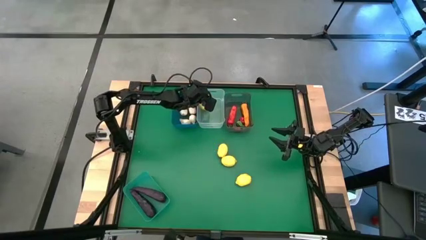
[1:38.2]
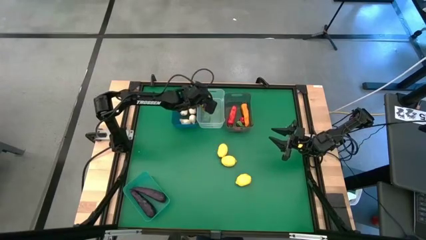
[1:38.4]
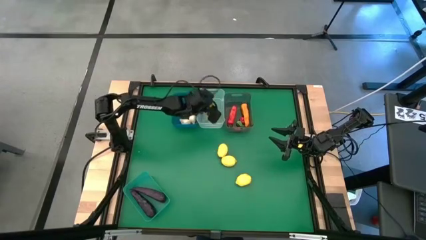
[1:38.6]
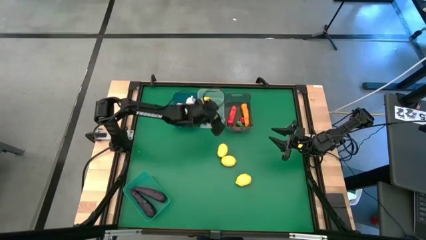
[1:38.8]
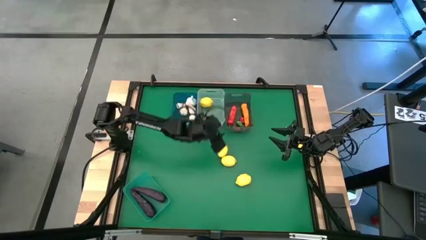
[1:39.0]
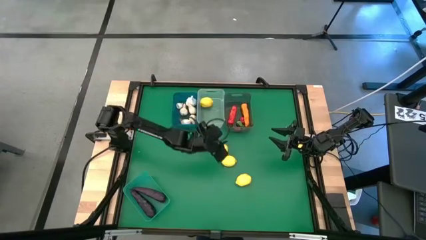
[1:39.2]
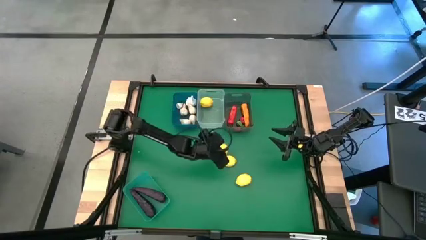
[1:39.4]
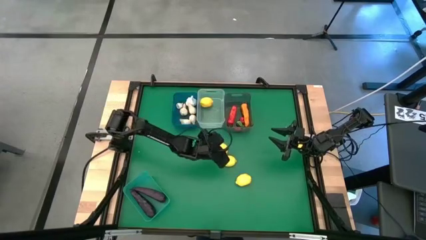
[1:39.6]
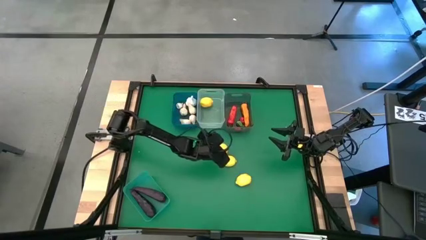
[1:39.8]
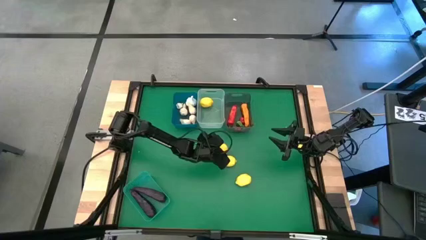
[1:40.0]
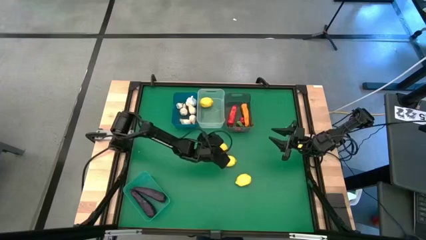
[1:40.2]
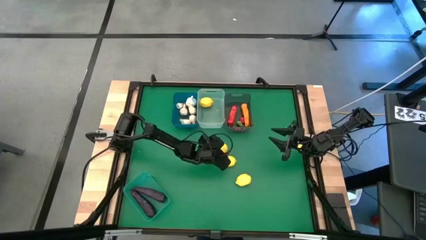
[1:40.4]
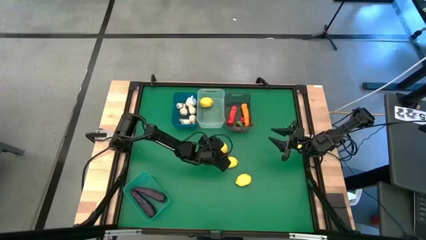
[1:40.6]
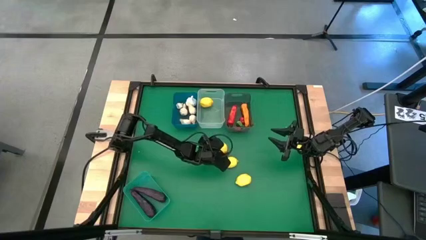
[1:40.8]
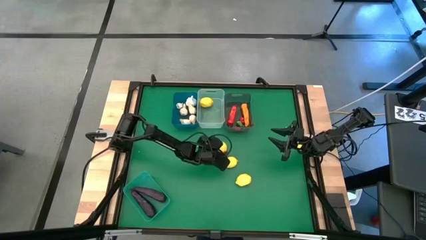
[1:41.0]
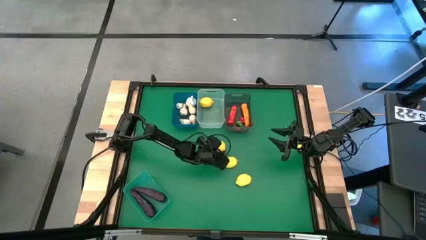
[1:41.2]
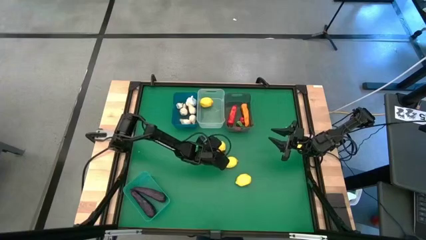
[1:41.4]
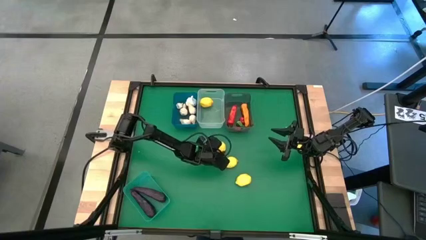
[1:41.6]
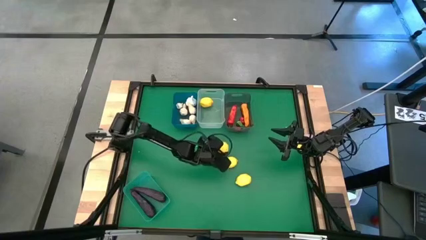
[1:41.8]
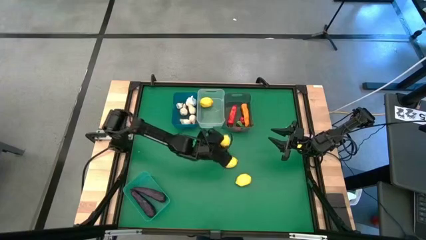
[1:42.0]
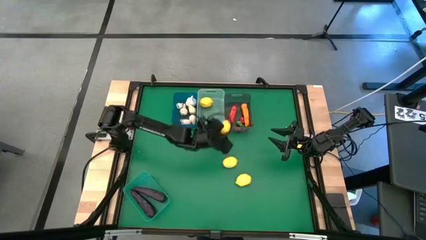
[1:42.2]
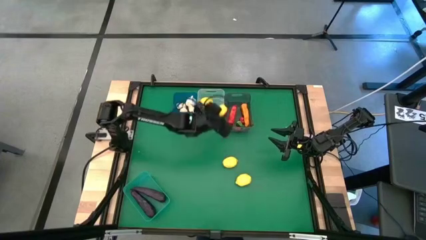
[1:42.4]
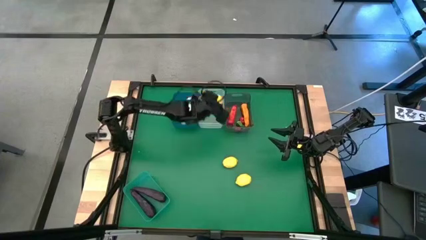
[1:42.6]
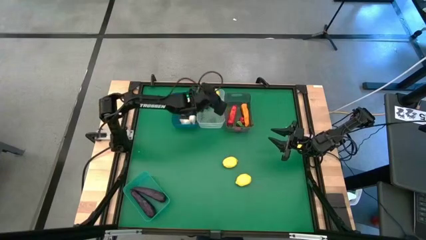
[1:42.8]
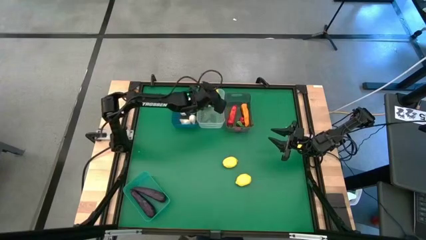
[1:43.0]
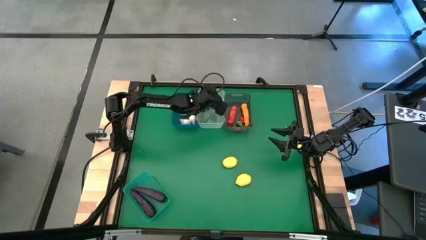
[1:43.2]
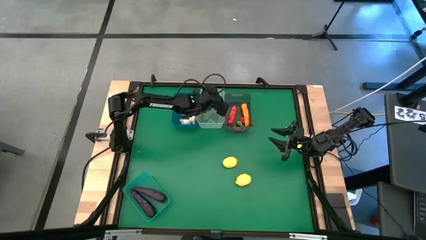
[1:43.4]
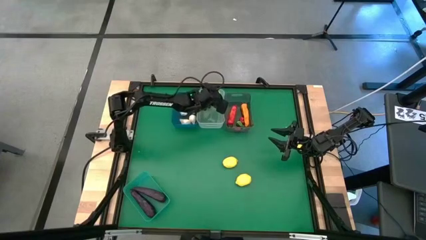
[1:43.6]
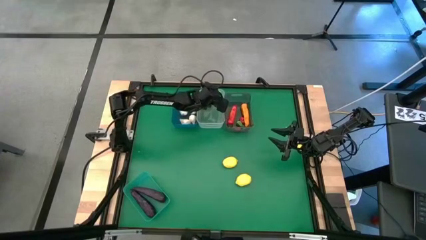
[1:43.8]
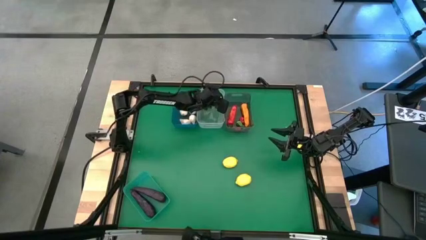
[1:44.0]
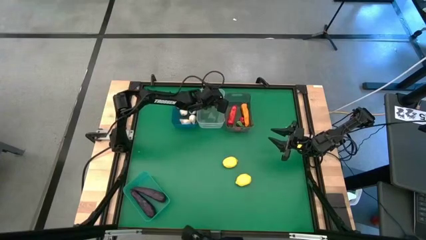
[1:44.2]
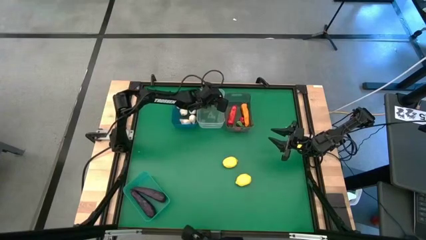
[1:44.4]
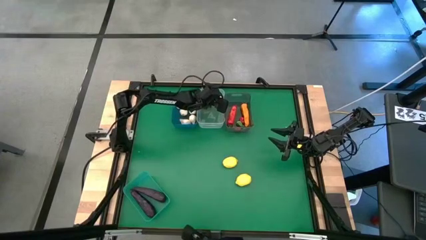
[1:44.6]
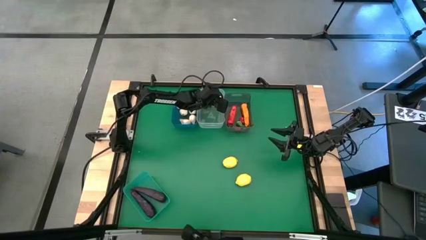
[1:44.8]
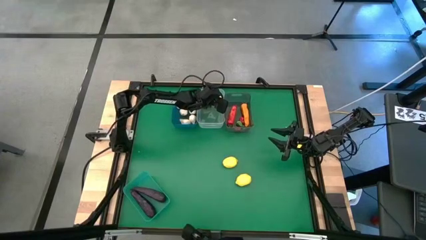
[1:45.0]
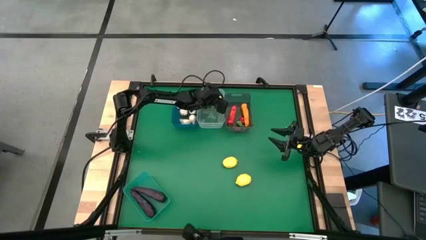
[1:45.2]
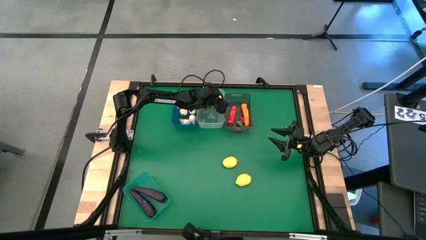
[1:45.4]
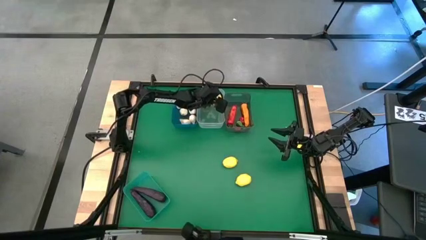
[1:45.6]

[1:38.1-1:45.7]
Task: Sort produce into baskets
Put the yellow lemon into the white bin

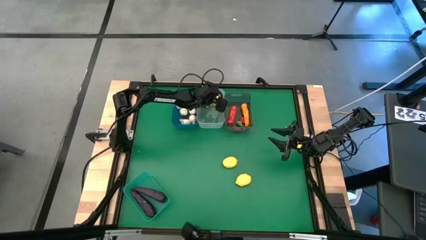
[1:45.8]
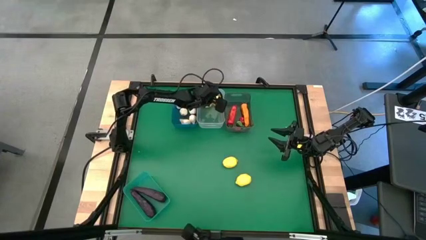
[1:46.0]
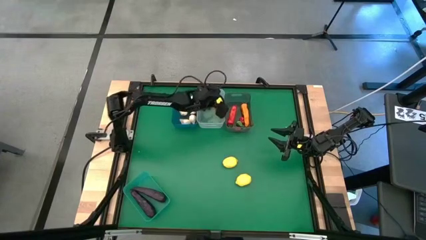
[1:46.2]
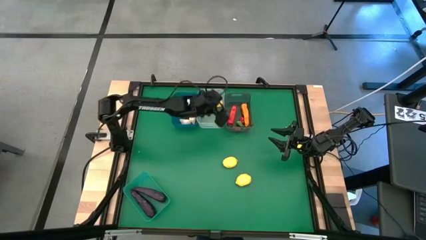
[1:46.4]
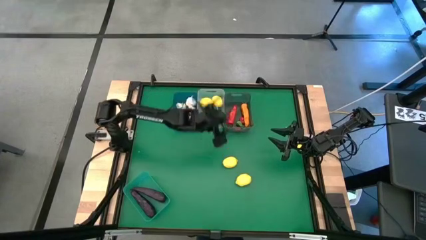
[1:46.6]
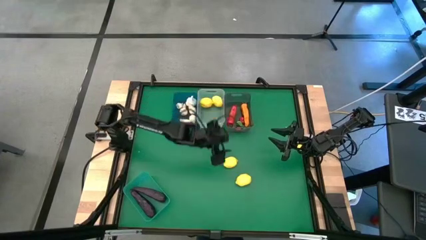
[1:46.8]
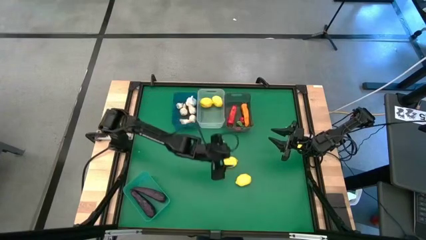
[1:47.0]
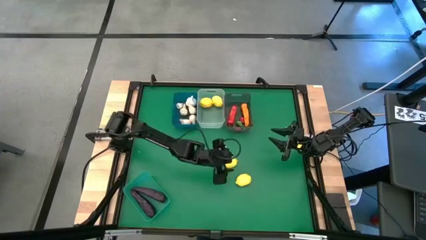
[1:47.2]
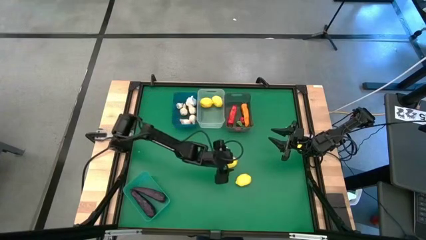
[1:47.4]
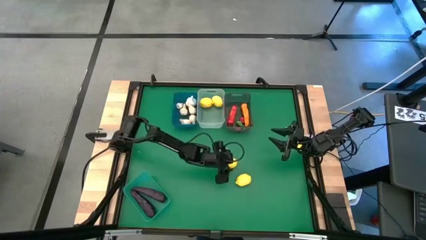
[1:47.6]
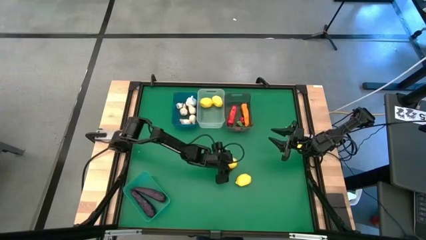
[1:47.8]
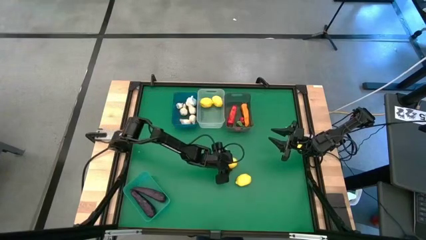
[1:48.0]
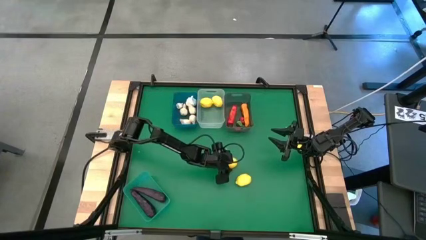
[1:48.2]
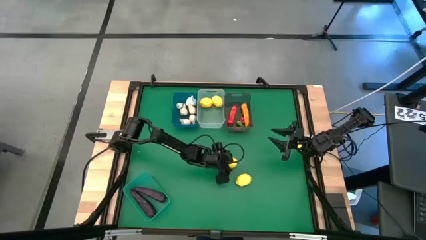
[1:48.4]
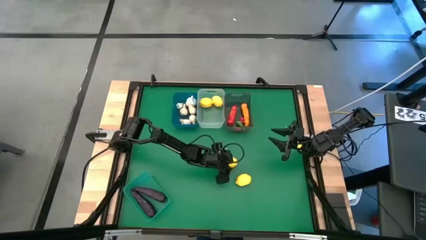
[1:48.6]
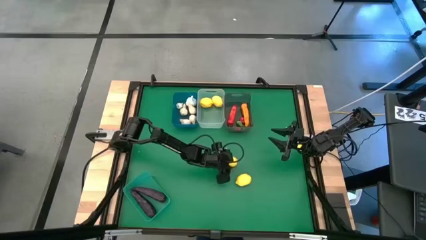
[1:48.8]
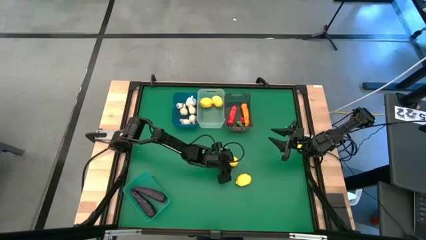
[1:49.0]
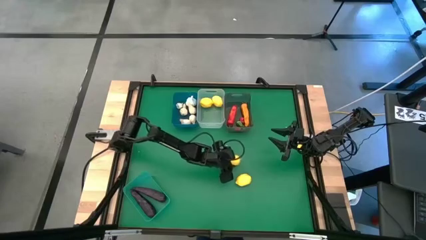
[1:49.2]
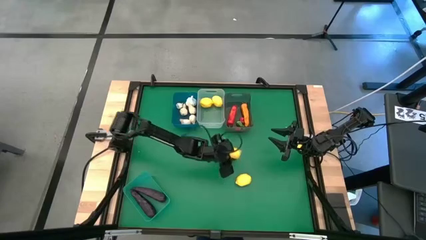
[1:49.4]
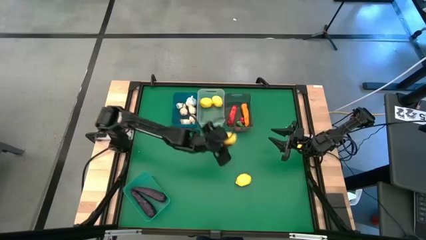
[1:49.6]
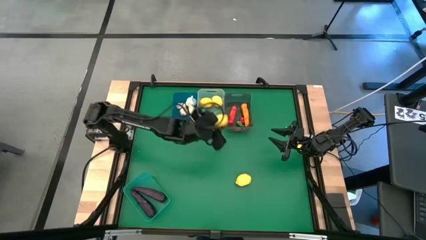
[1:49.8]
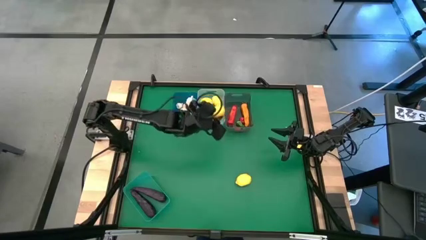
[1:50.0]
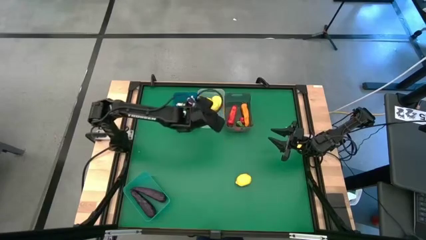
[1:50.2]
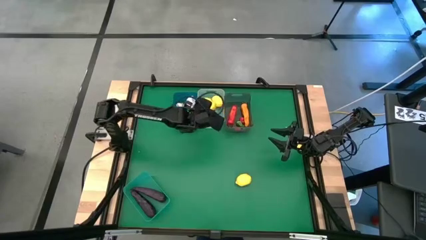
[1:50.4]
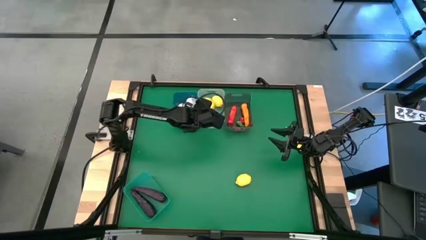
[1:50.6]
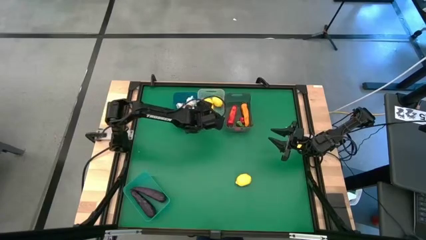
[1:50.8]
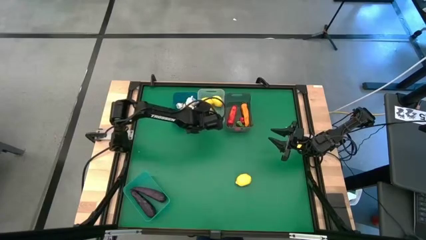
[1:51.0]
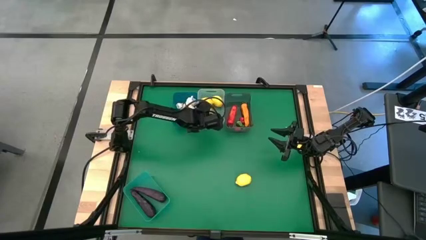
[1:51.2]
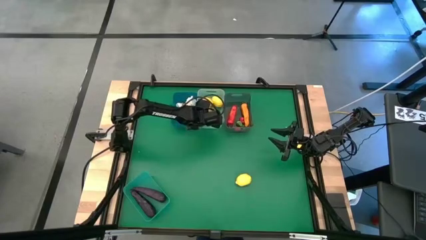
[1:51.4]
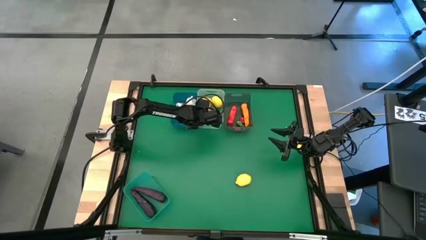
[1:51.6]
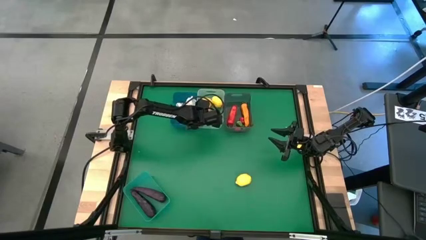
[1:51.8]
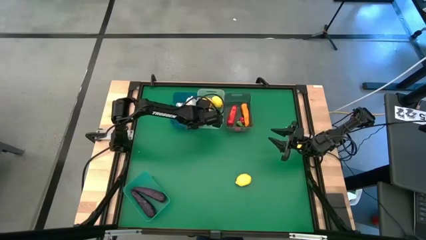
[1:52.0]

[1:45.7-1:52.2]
Put the yellow lemon into the white bin

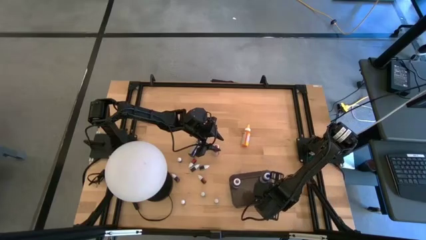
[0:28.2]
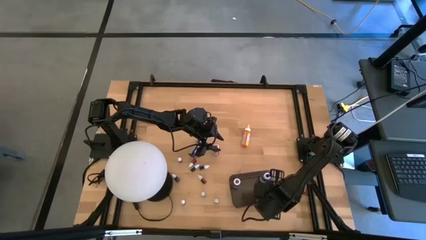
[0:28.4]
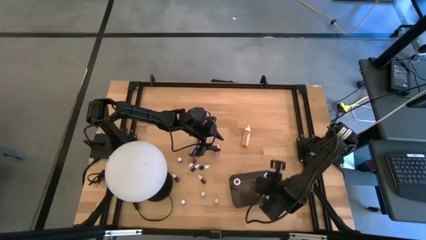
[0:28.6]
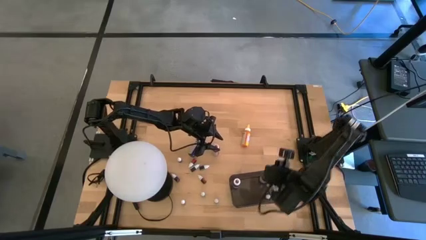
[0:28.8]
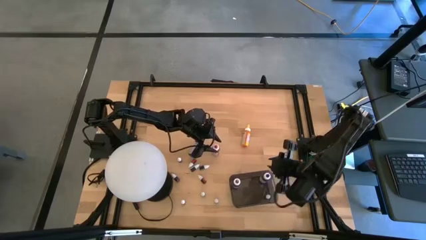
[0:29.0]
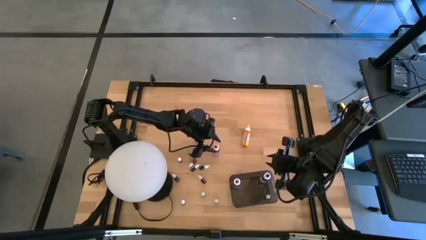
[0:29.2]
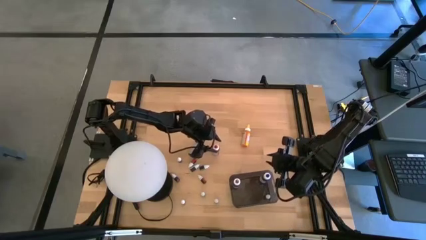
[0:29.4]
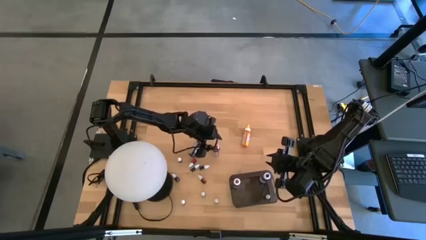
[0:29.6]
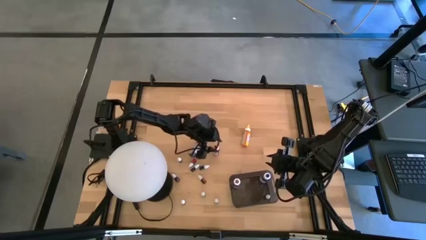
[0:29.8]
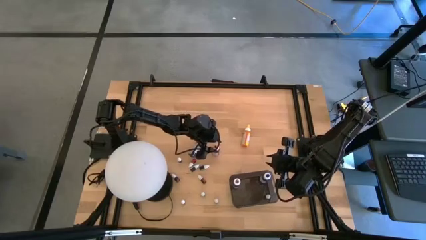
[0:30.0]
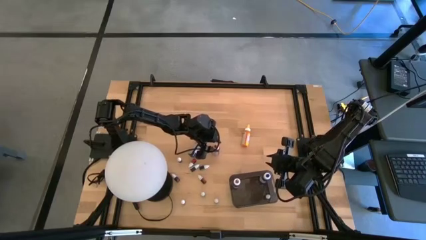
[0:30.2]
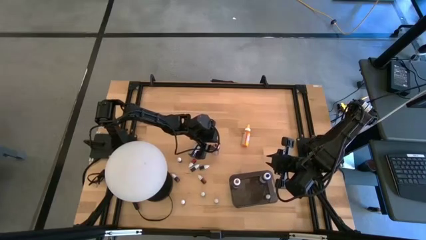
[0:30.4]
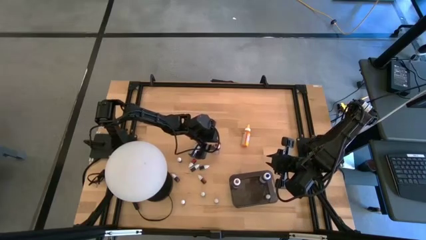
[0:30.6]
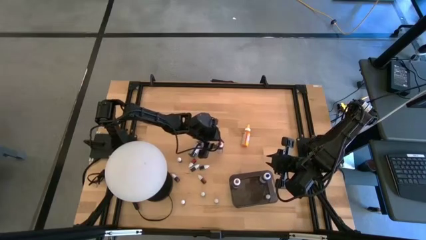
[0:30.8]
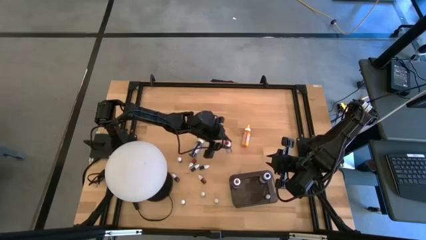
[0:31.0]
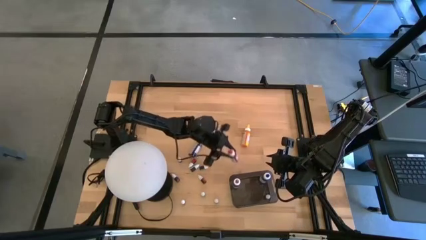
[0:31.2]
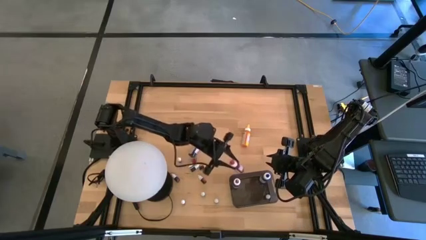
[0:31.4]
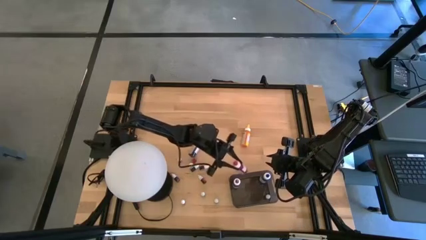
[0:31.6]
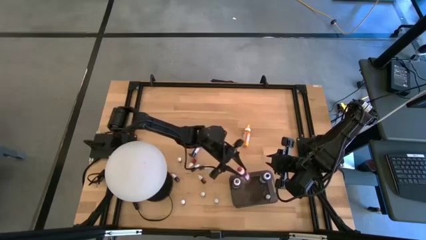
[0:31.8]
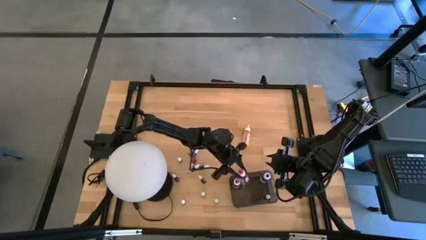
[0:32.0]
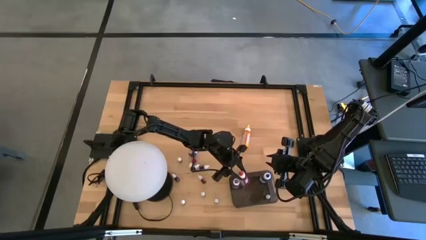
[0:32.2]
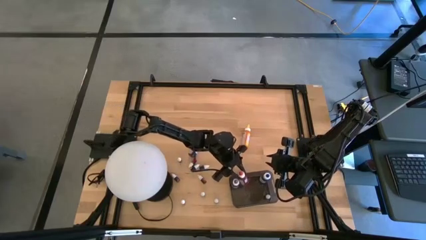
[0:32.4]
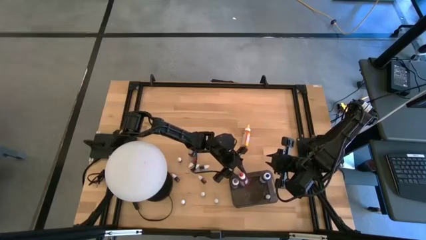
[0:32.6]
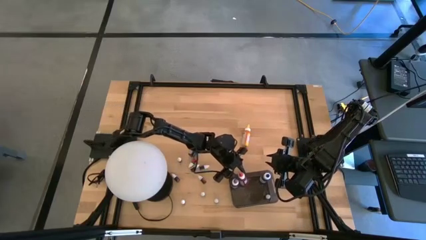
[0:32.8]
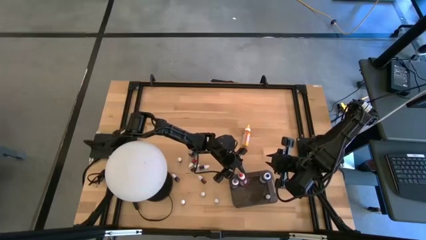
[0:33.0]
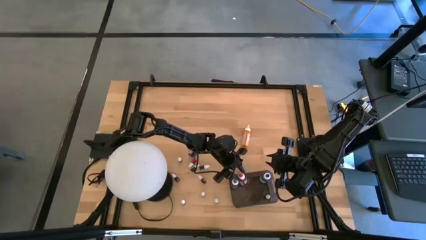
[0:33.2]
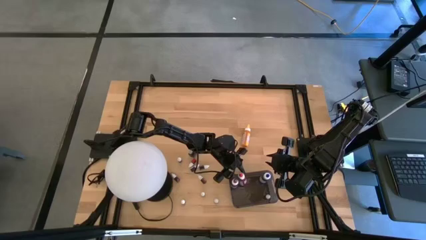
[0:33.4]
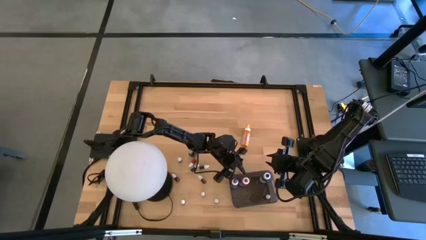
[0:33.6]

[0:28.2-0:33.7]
Task: Pick & Place food coloring
Put the large red food coloring bottle into the bin
